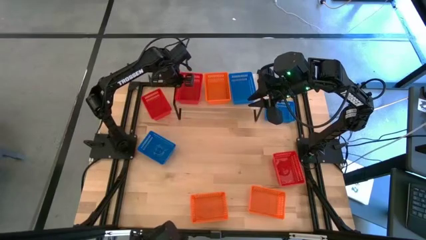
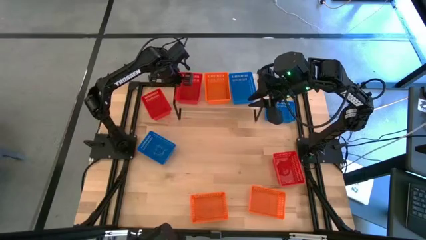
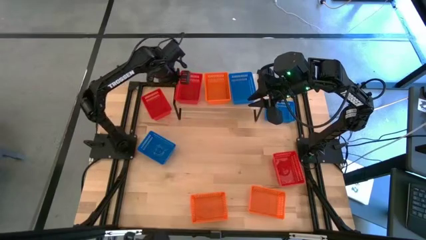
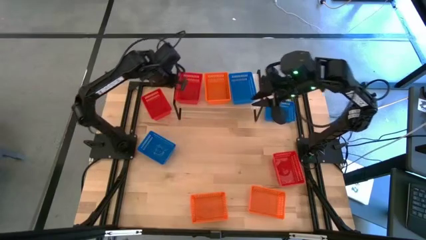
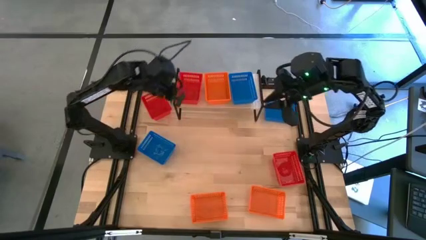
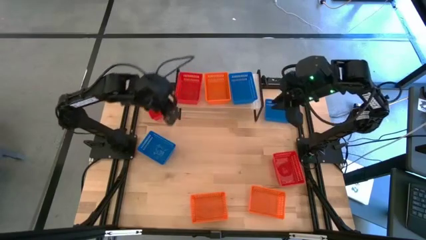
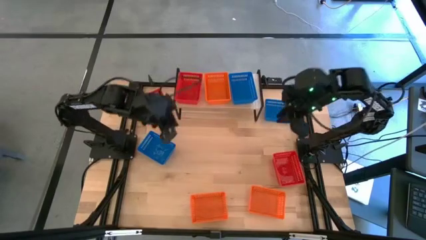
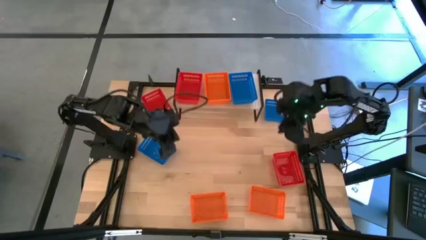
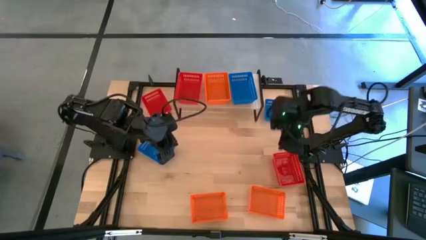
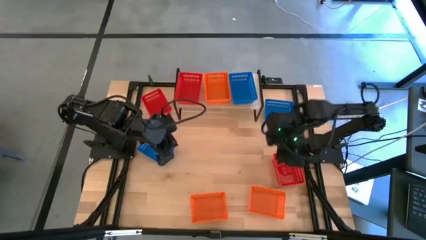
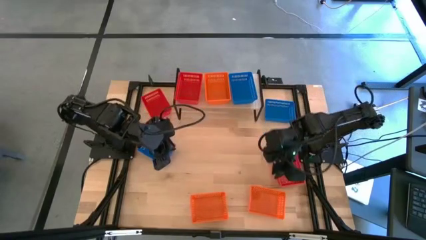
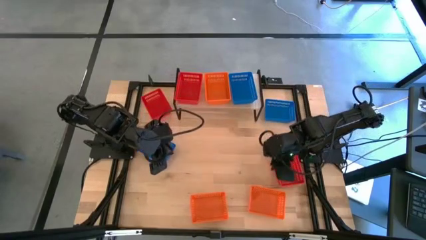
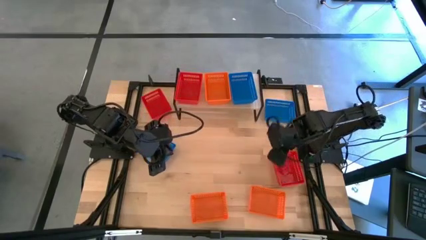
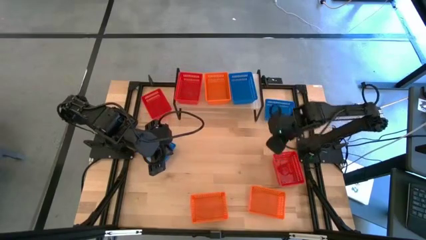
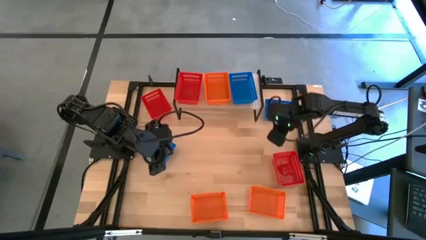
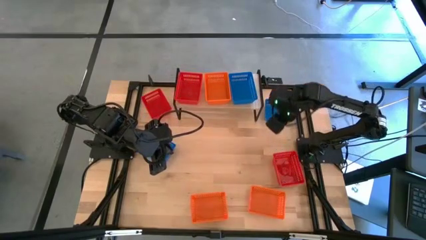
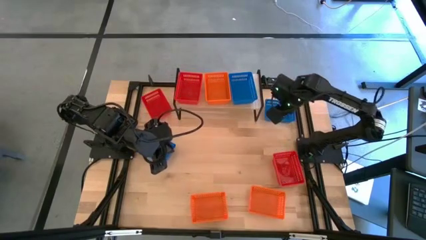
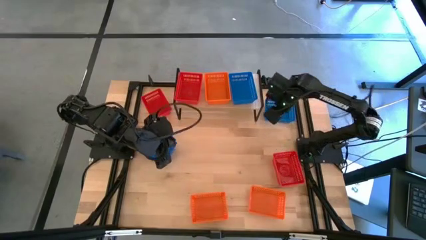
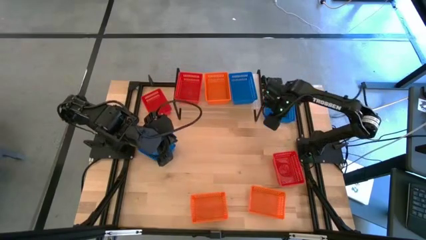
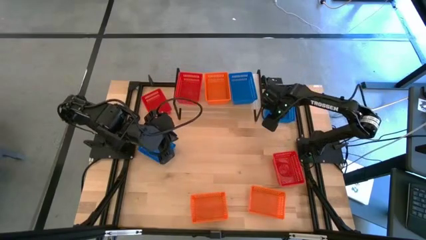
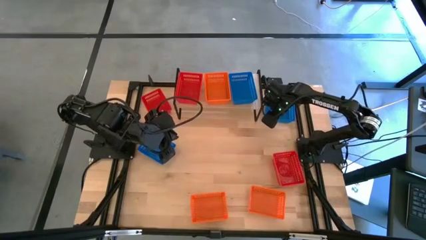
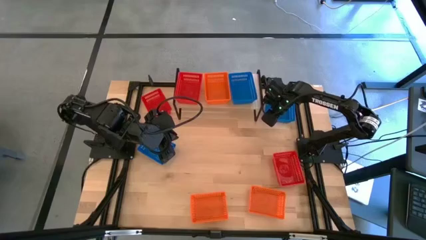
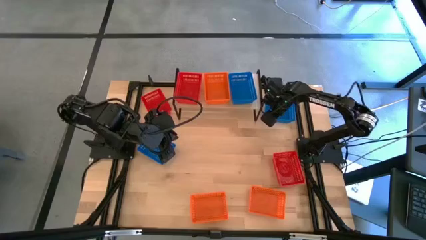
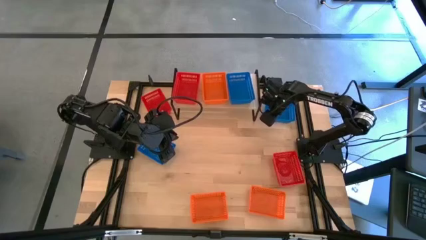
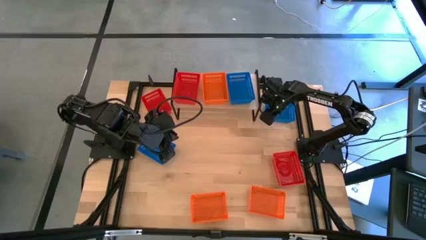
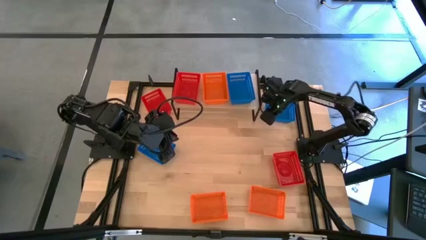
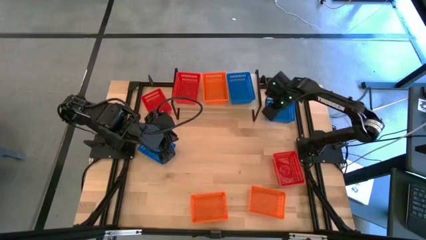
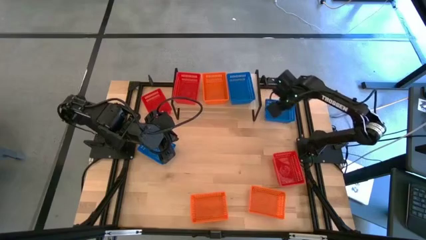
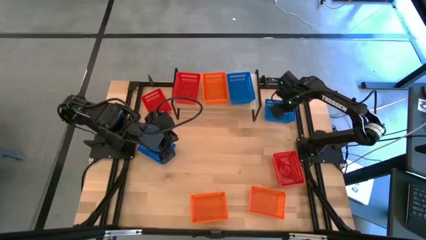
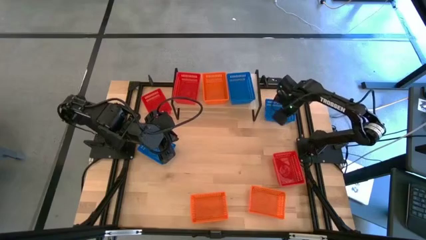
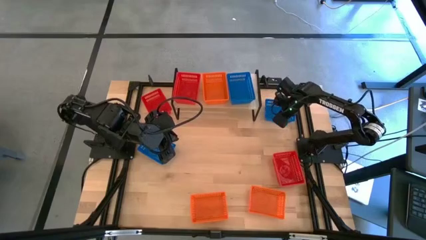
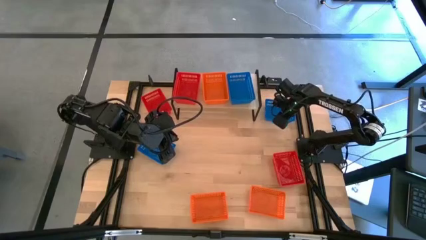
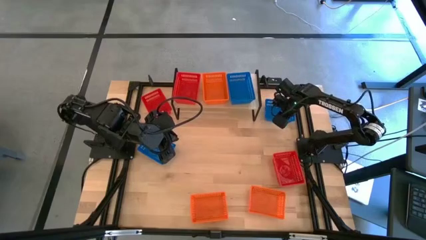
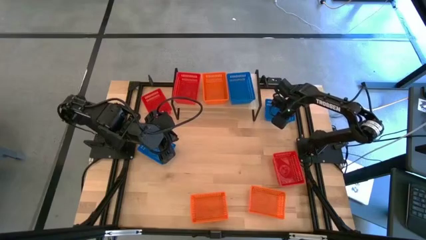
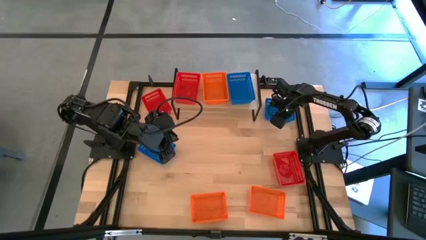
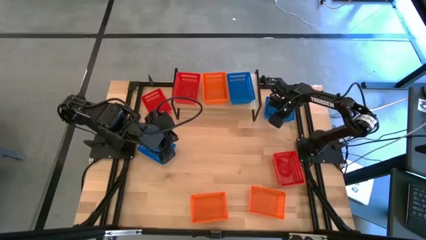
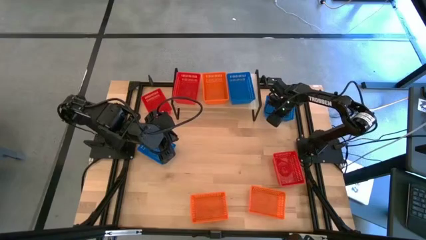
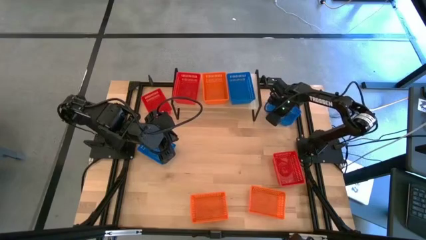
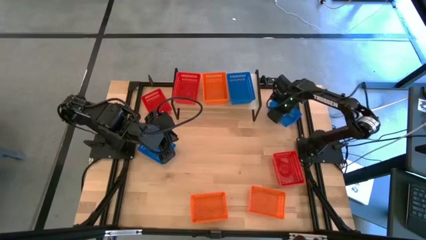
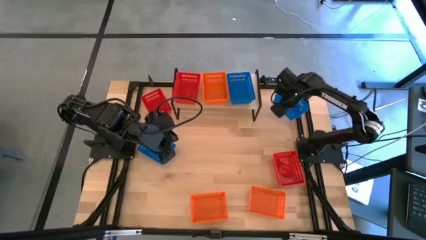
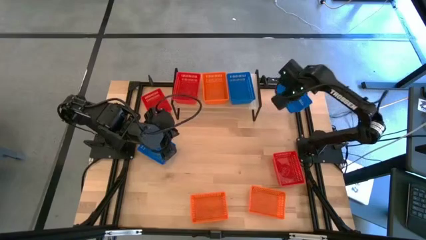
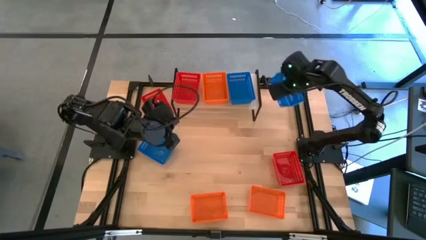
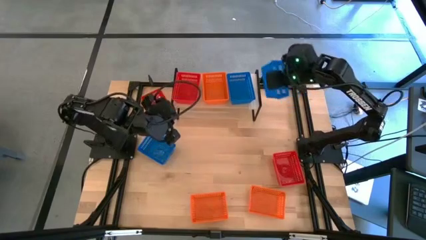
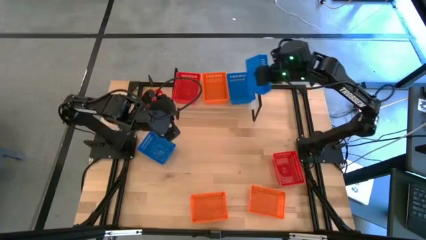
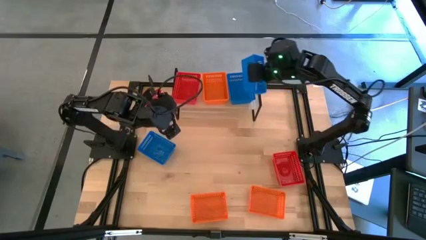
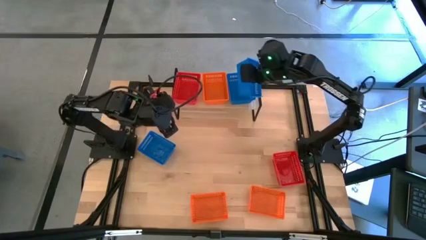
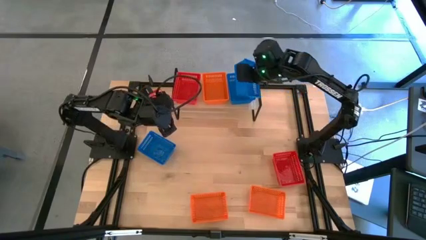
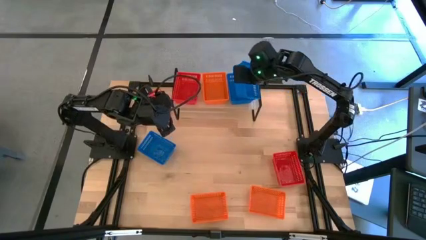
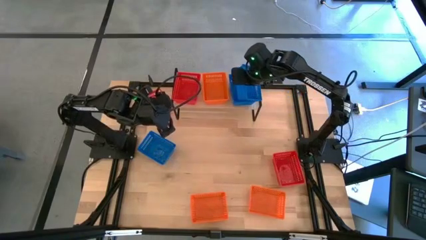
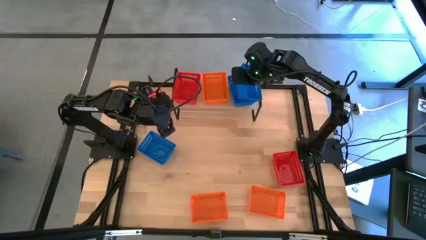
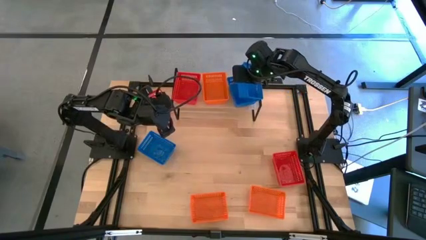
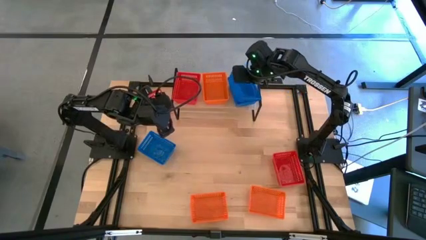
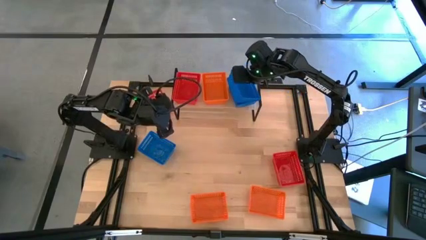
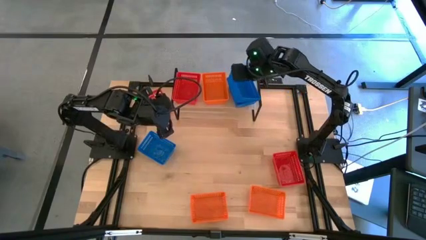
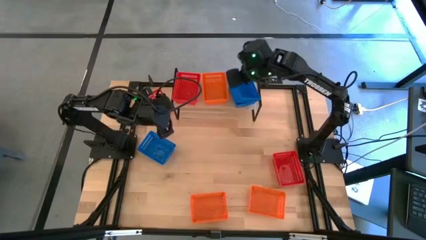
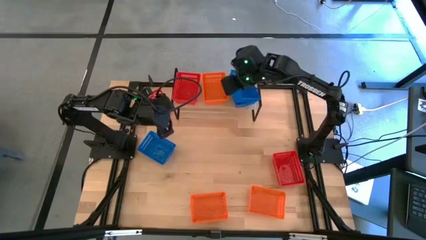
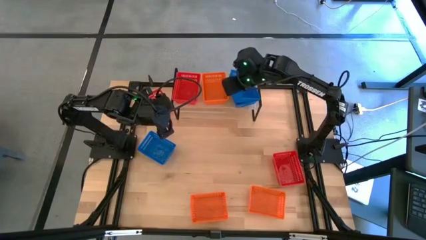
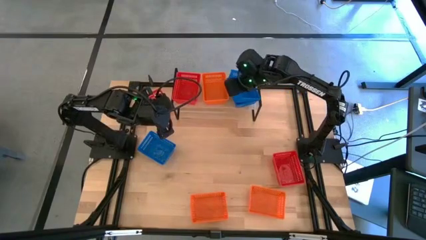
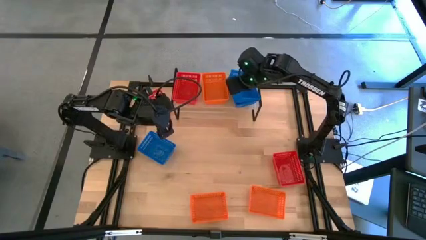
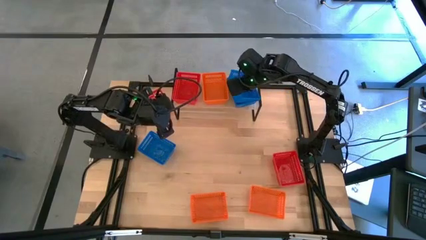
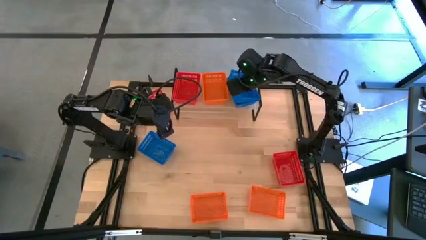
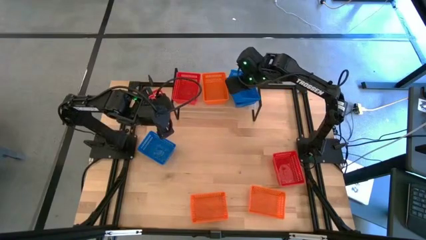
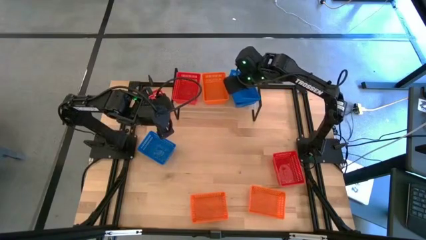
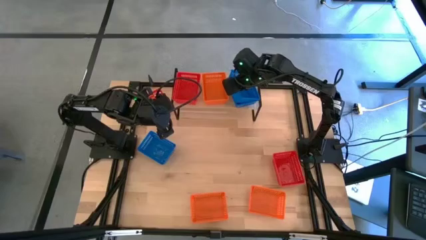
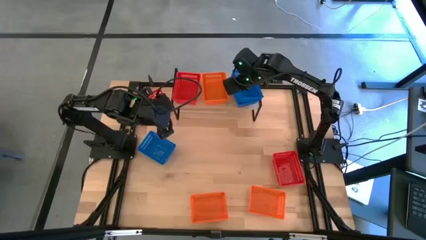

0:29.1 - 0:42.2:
Task: Stack baskets on shelf by color
Stack the right blue basket into the blue basket on the shelf
